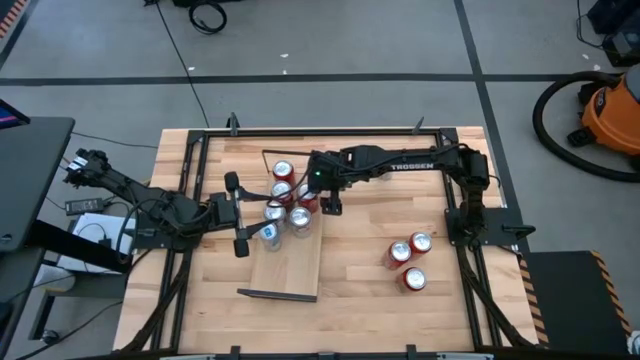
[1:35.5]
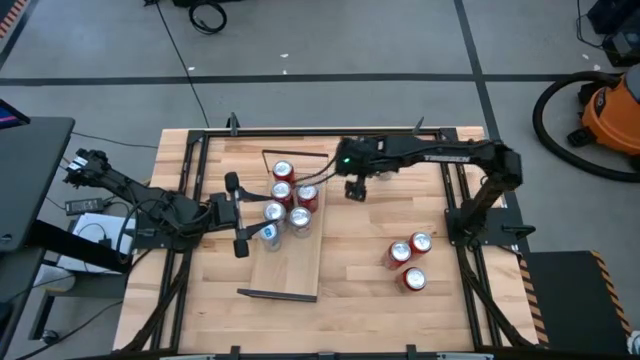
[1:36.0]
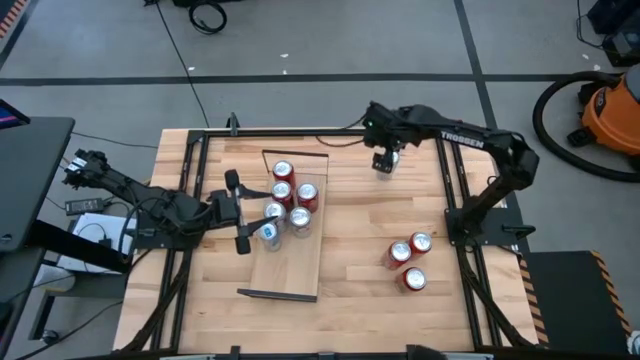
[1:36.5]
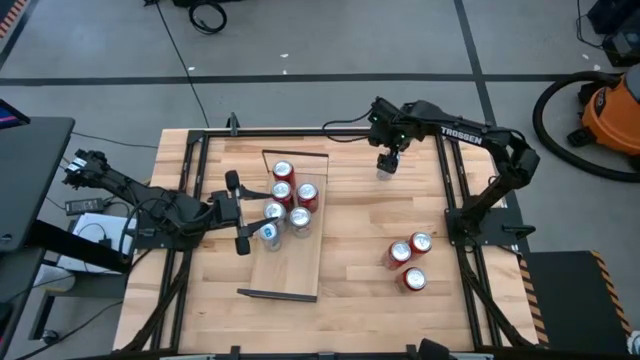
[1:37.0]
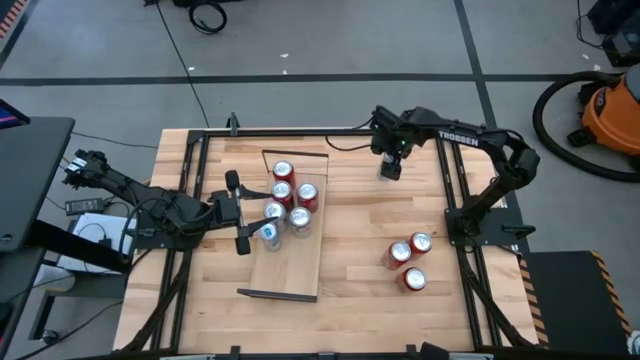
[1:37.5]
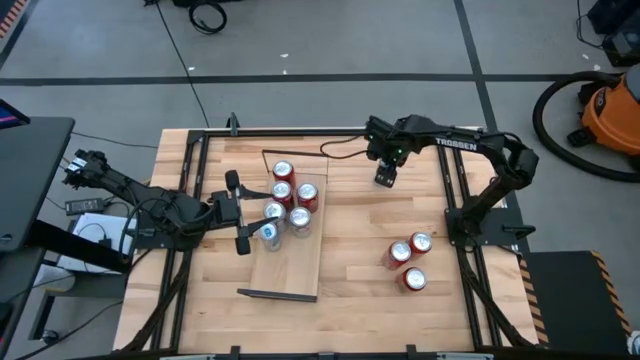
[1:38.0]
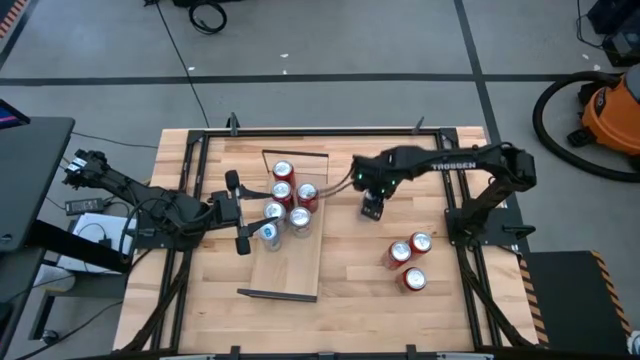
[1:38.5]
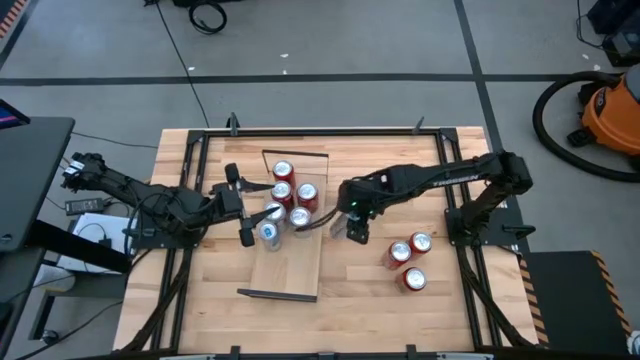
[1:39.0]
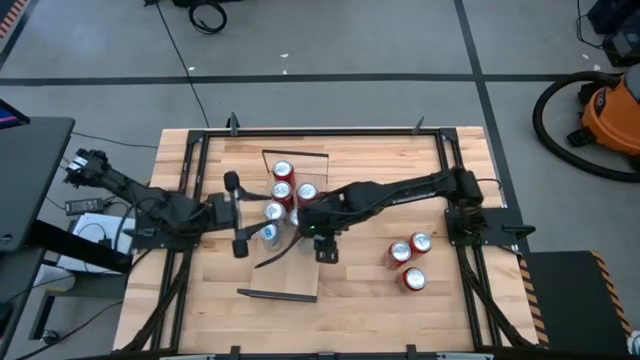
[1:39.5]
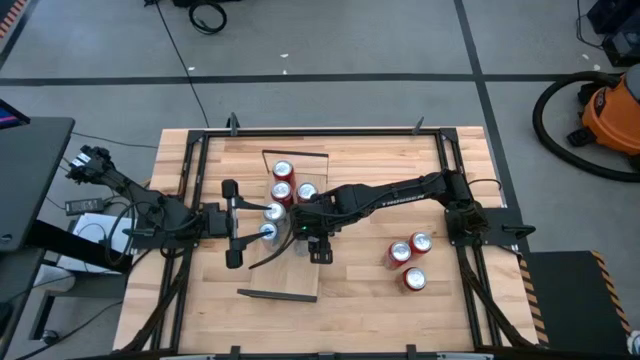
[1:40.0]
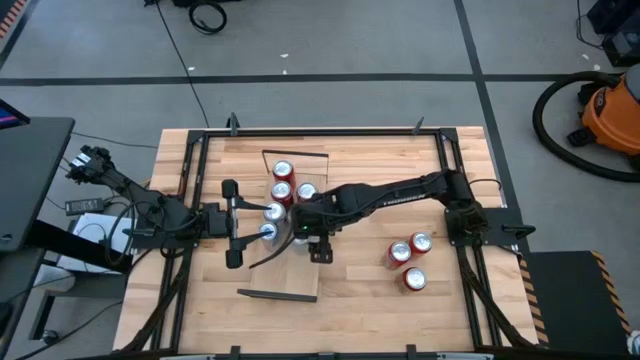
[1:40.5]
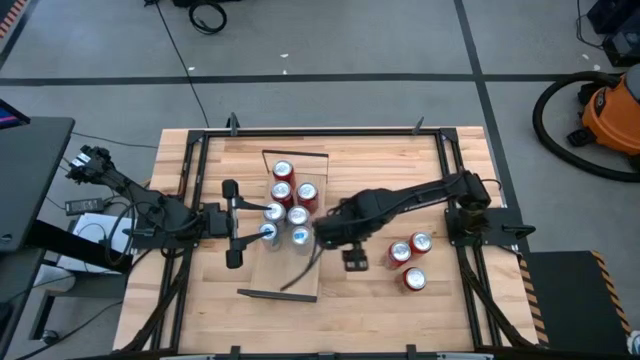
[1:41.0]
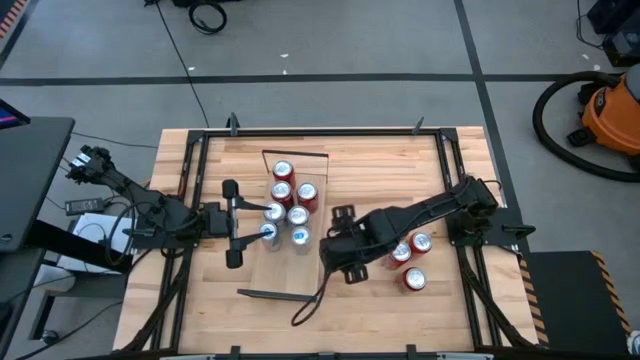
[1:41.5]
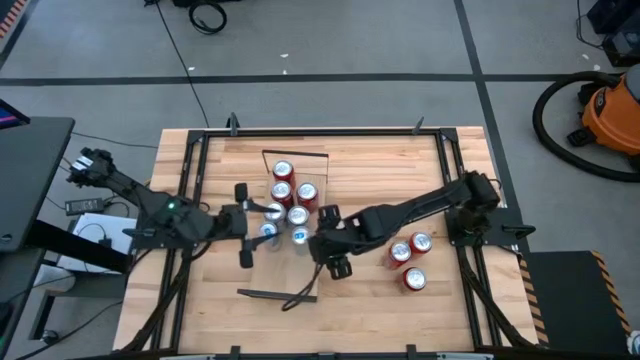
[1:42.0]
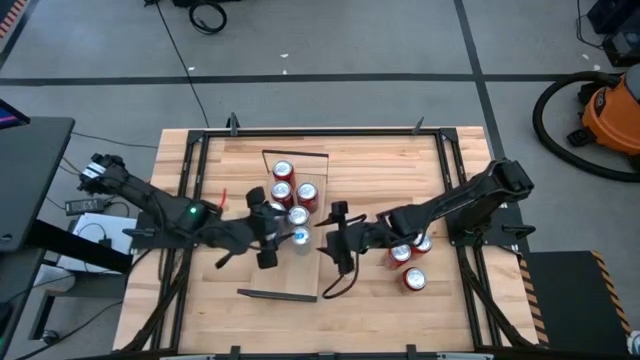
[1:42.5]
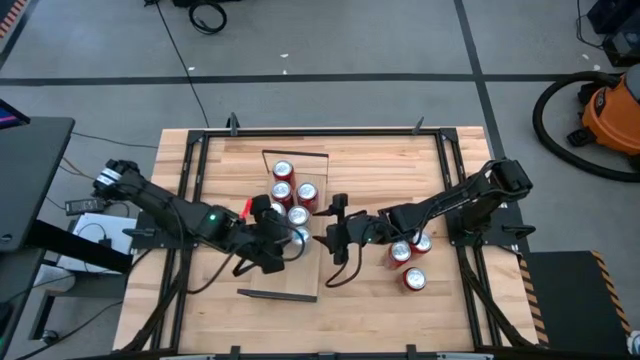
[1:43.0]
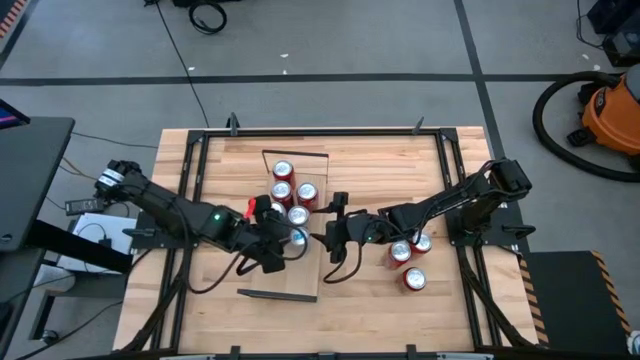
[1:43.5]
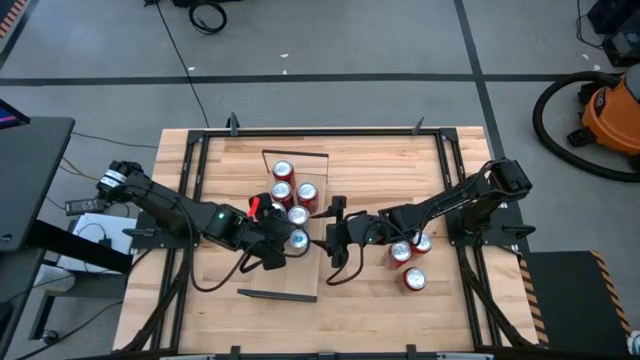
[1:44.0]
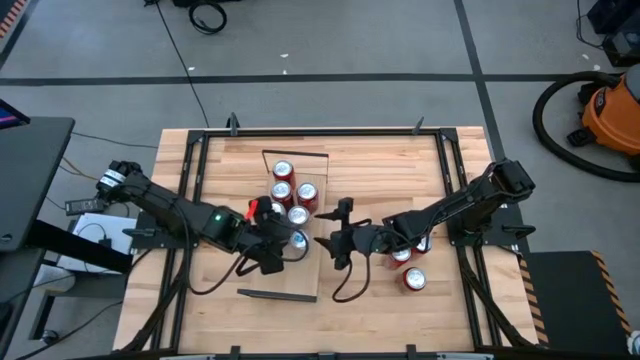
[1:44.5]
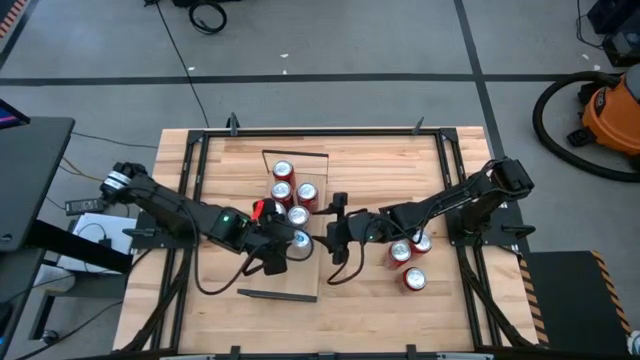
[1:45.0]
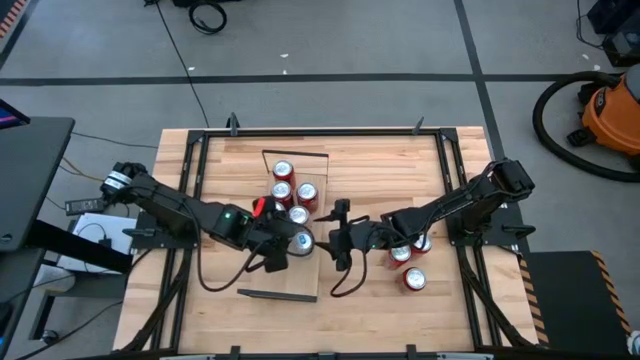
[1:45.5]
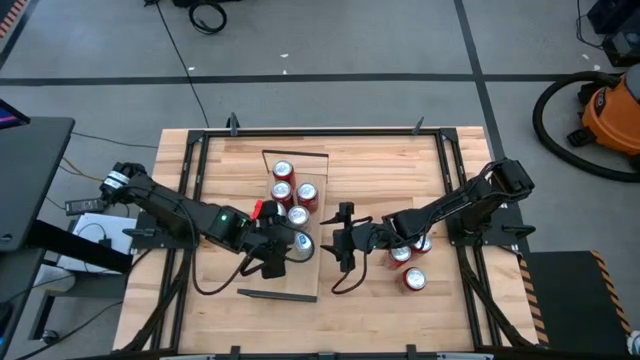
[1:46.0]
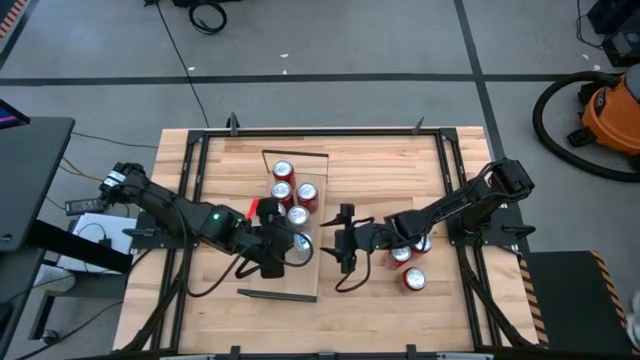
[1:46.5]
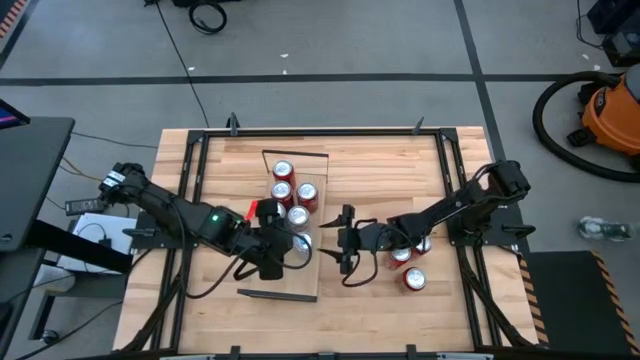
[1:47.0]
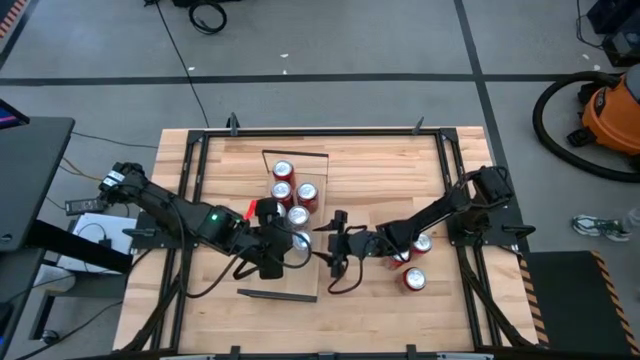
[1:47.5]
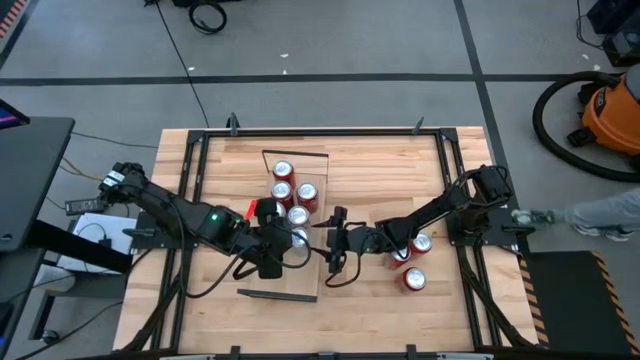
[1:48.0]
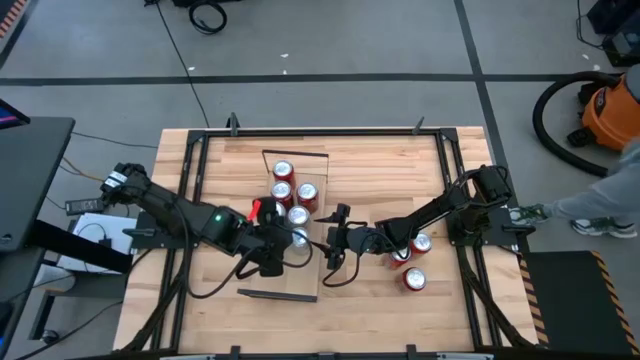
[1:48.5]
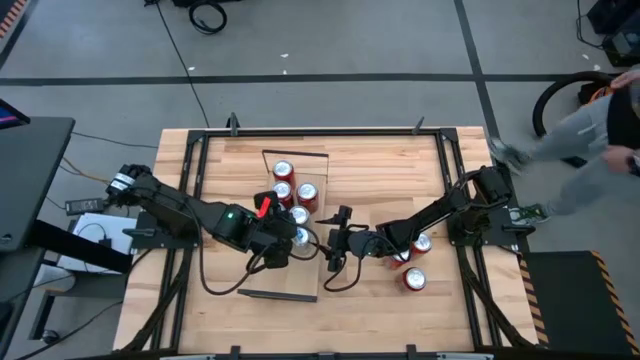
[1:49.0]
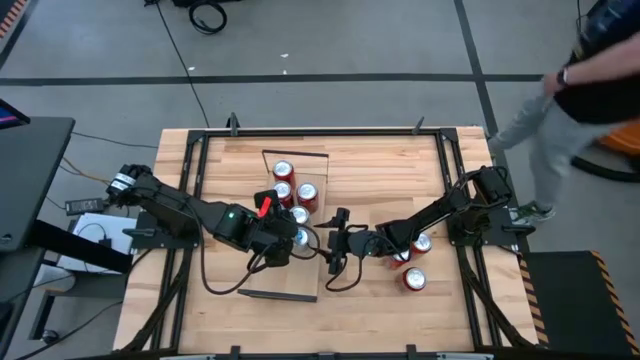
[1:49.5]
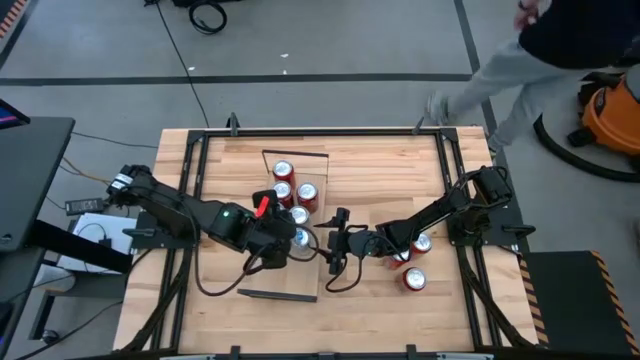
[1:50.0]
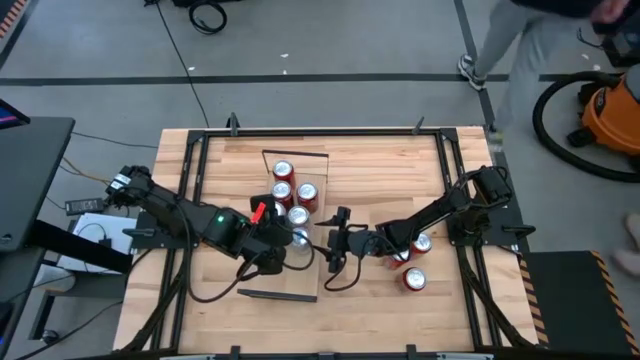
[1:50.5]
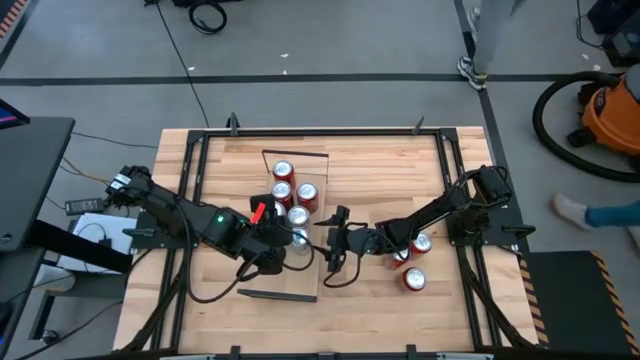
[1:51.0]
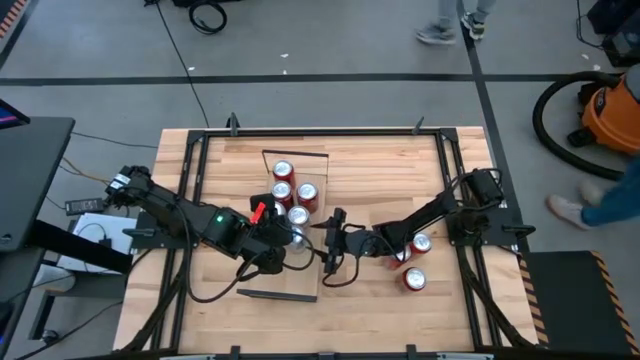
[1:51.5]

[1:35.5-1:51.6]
Task: Place canned beverage on shelf
Put the blue soda can on the shelf aligned with the blue soda can

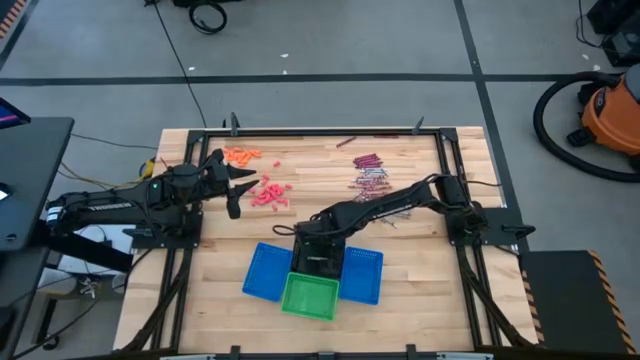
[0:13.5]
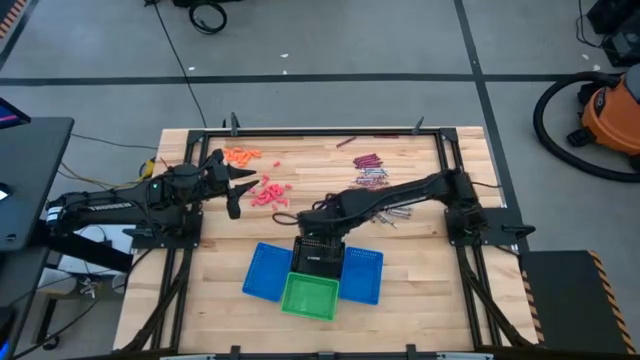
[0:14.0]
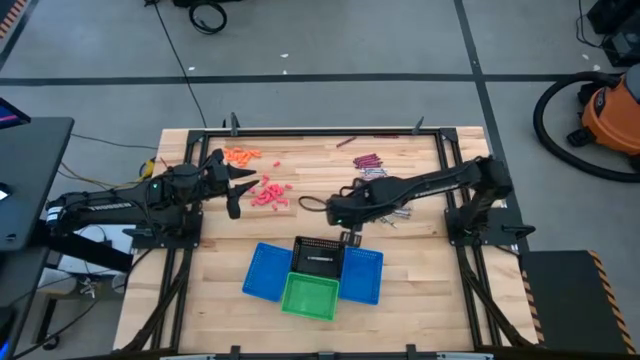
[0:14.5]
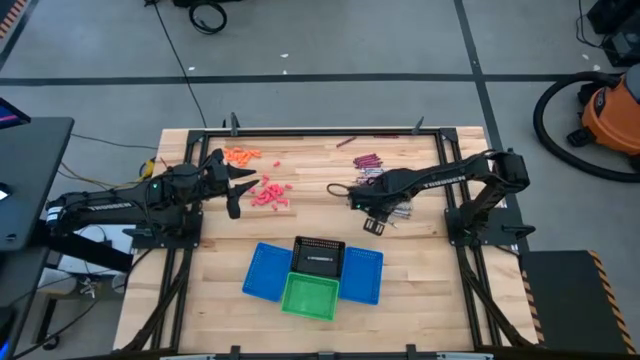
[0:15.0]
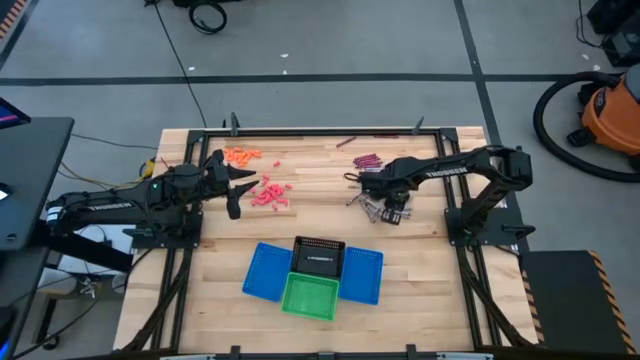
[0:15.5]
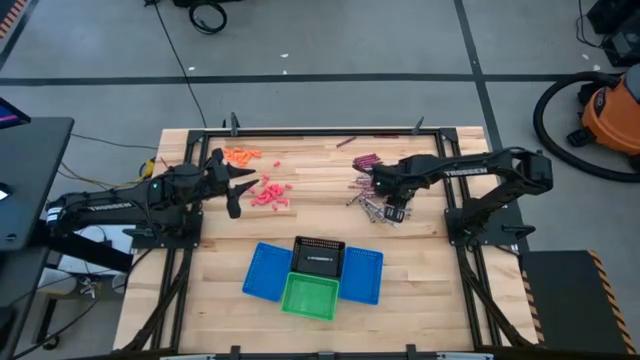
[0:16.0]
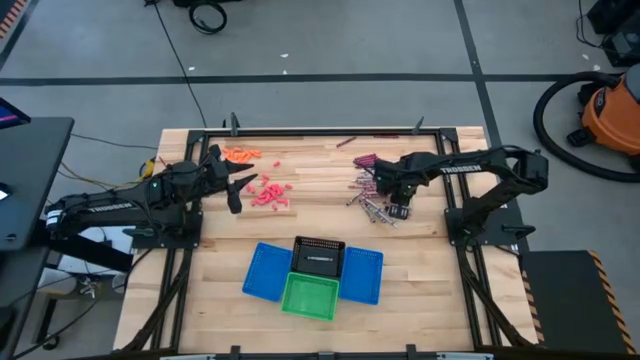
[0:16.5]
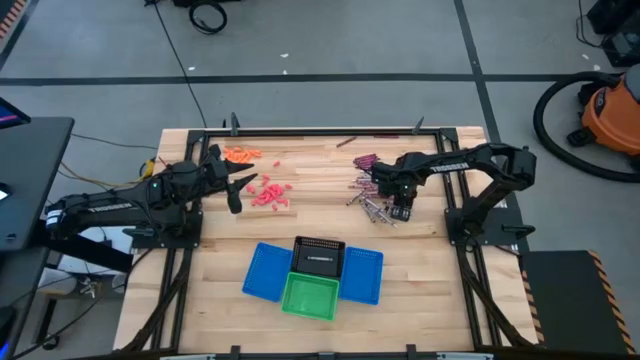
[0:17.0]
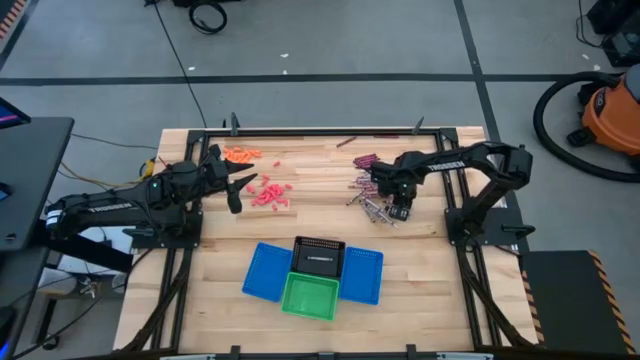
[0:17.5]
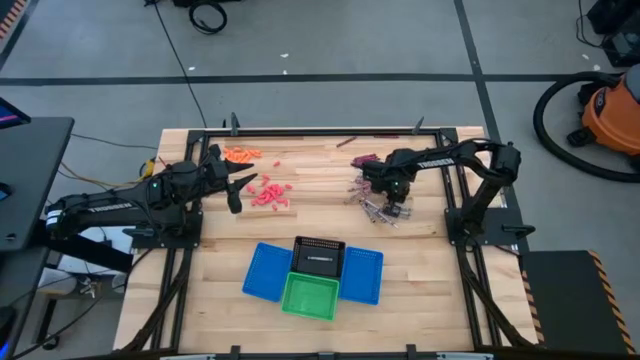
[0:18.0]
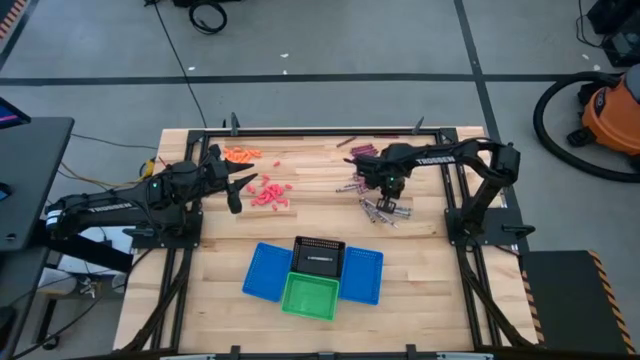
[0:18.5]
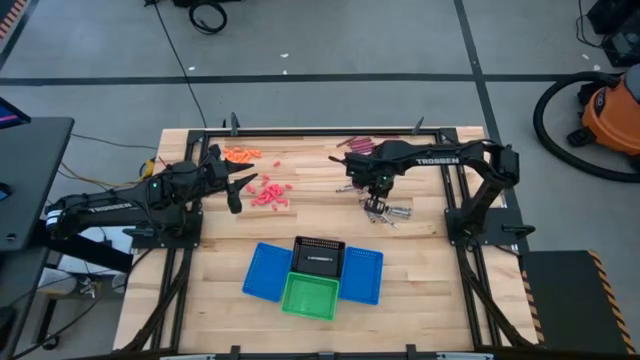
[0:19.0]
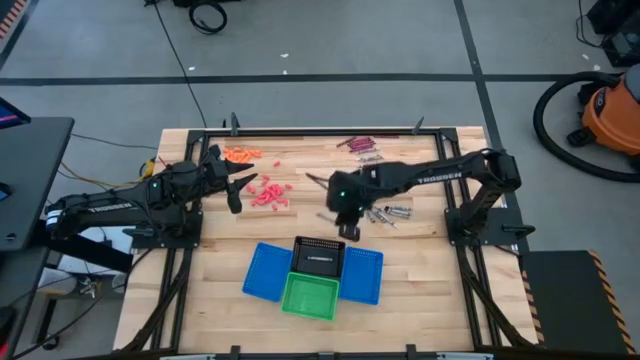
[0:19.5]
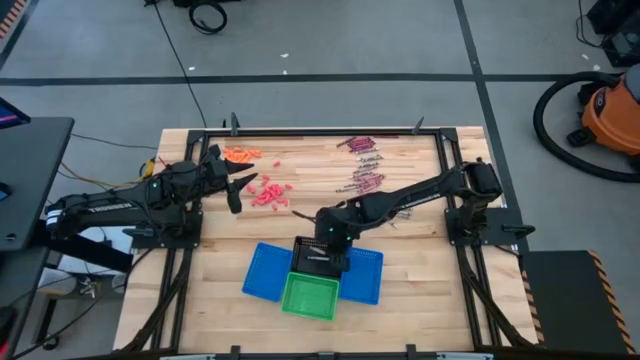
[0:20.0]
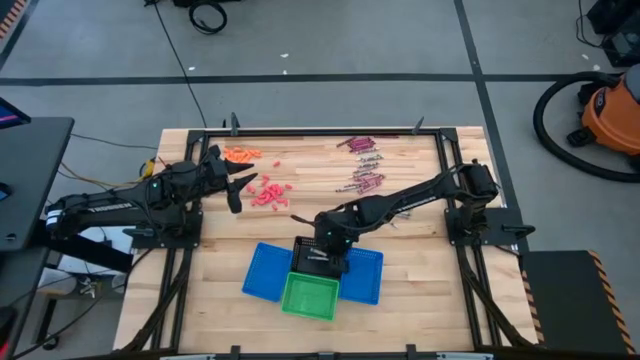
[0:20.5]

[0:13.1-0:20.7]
Task: Sort crayons
Put the black crayon into the black bin
